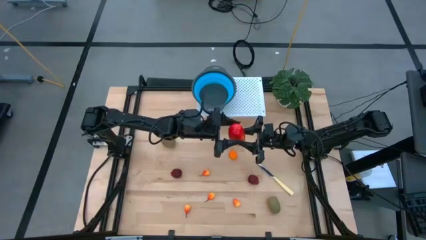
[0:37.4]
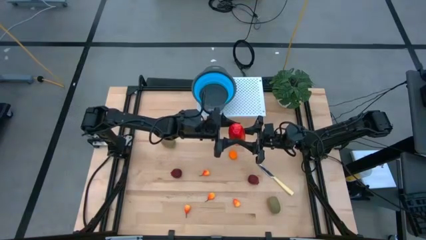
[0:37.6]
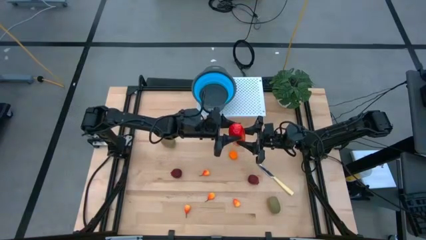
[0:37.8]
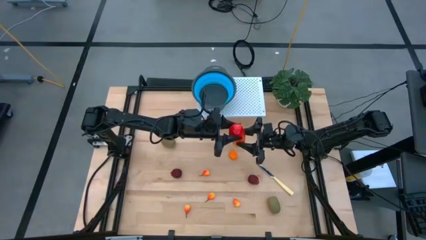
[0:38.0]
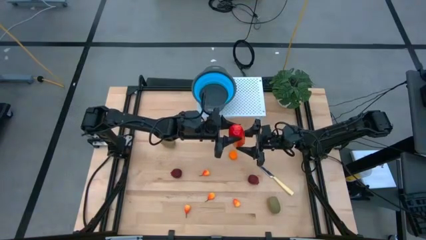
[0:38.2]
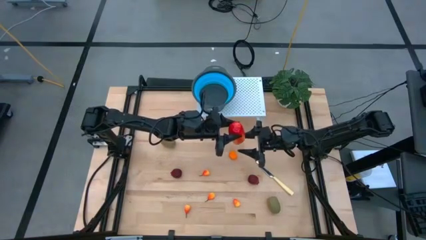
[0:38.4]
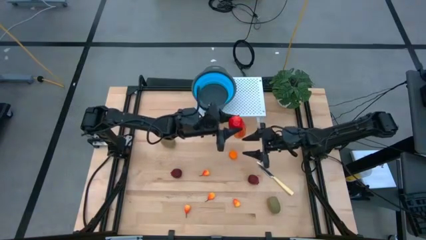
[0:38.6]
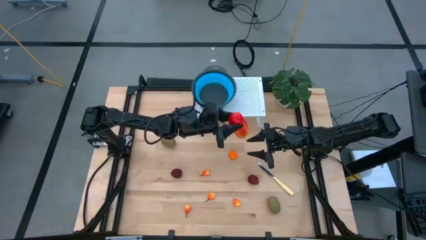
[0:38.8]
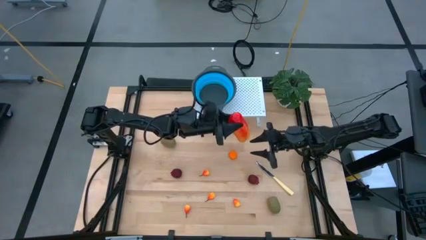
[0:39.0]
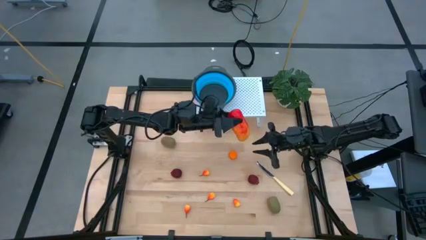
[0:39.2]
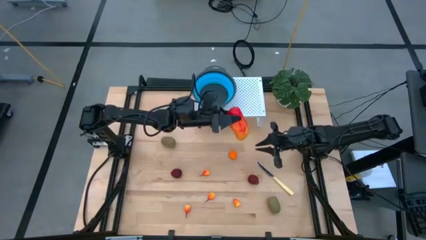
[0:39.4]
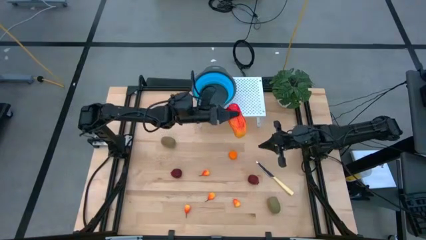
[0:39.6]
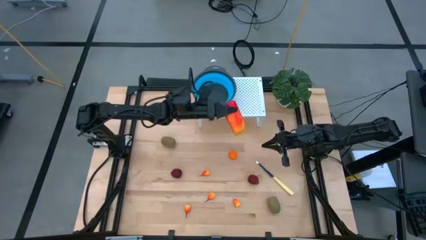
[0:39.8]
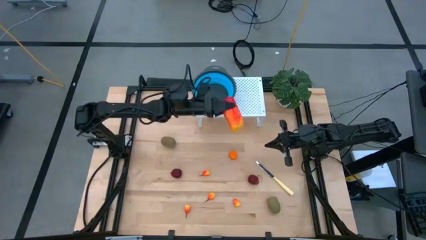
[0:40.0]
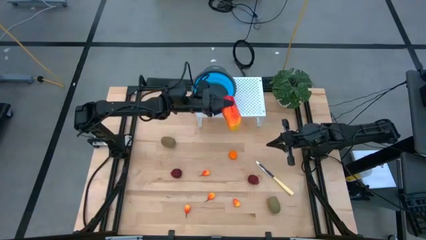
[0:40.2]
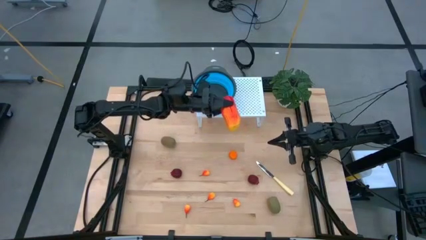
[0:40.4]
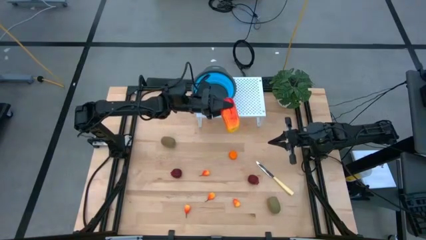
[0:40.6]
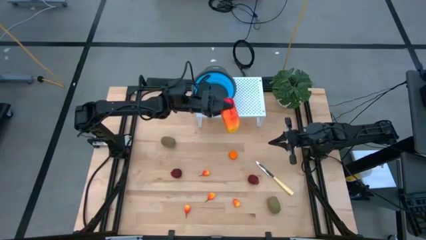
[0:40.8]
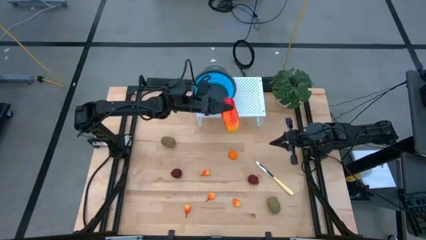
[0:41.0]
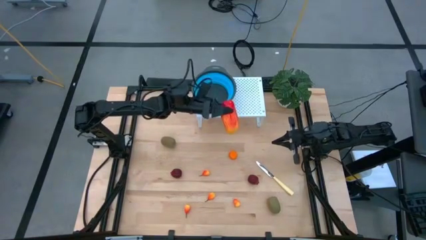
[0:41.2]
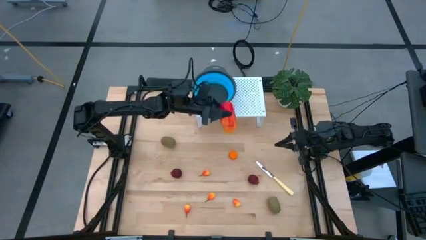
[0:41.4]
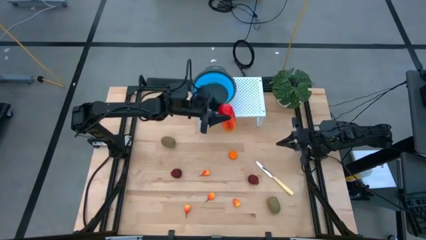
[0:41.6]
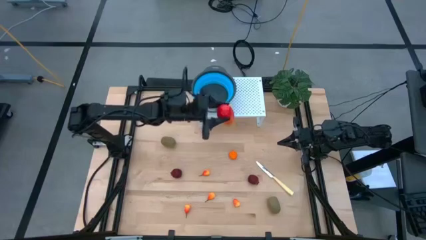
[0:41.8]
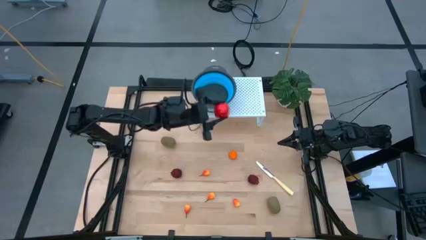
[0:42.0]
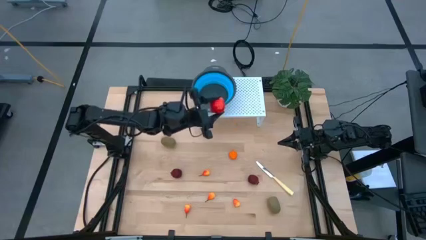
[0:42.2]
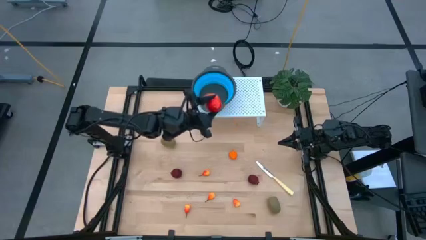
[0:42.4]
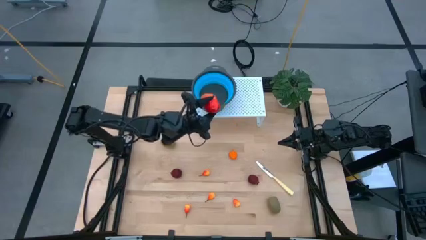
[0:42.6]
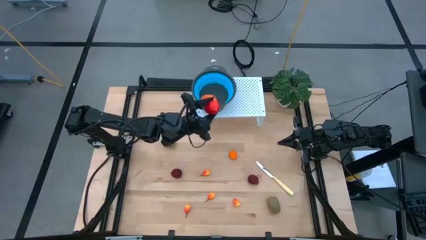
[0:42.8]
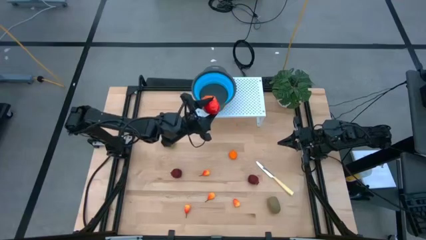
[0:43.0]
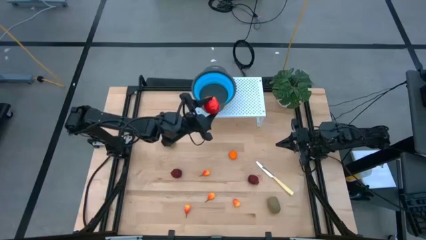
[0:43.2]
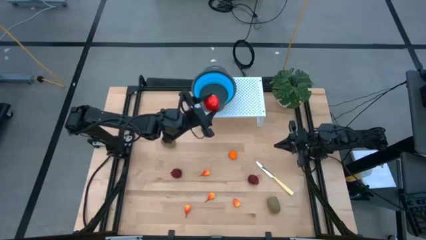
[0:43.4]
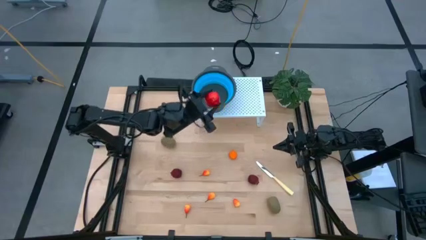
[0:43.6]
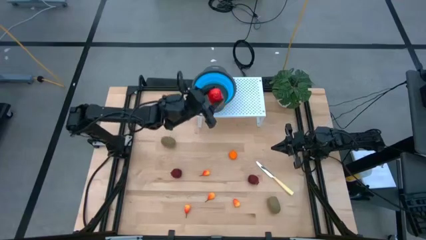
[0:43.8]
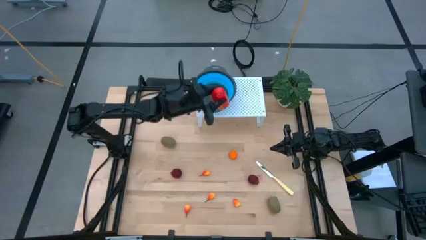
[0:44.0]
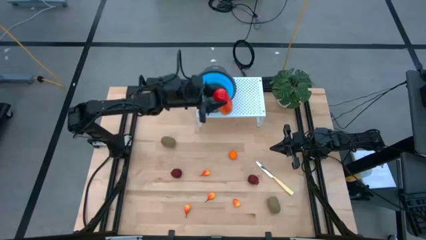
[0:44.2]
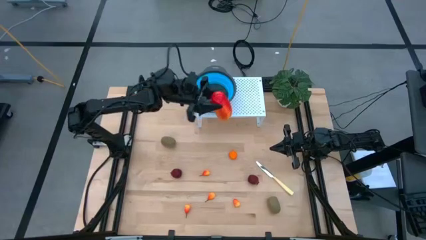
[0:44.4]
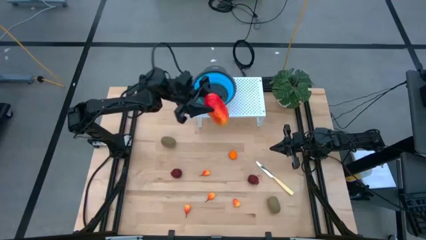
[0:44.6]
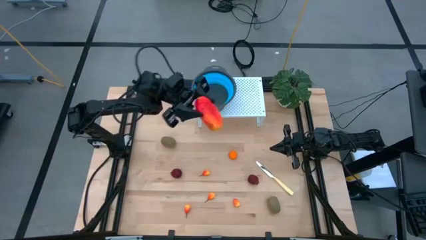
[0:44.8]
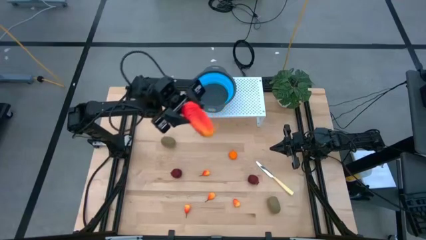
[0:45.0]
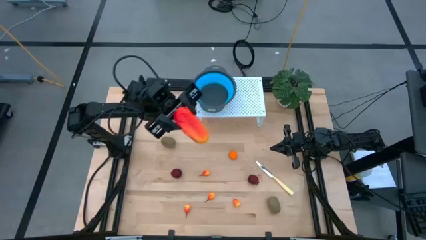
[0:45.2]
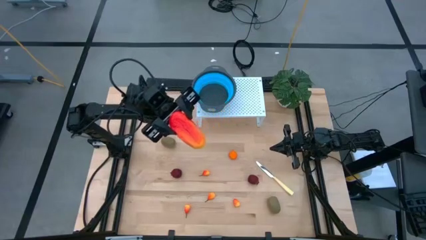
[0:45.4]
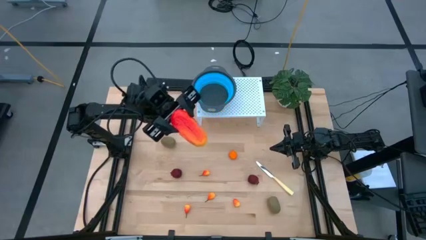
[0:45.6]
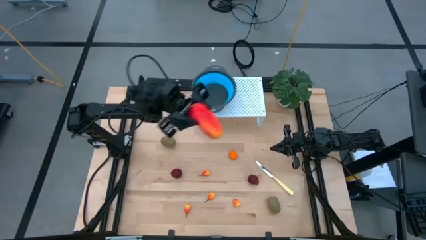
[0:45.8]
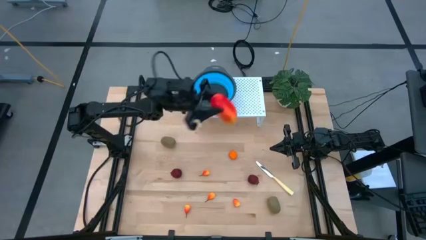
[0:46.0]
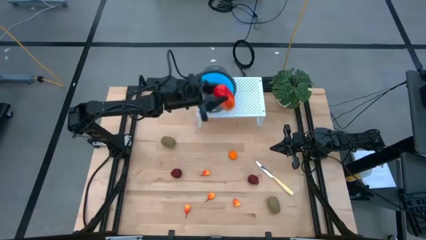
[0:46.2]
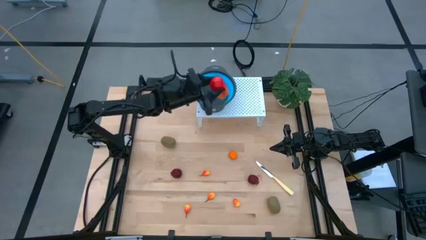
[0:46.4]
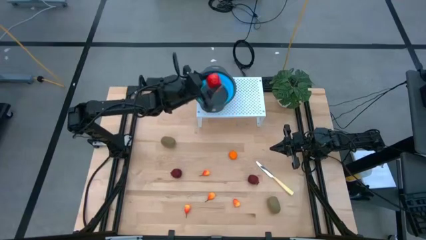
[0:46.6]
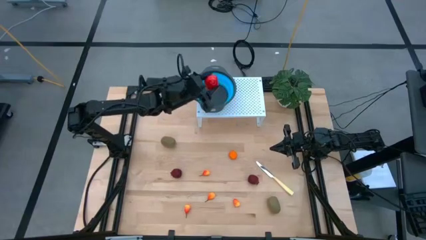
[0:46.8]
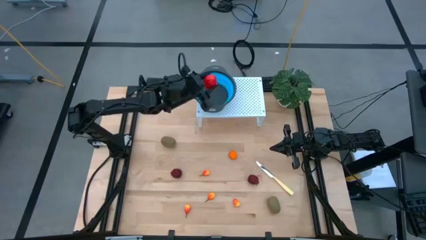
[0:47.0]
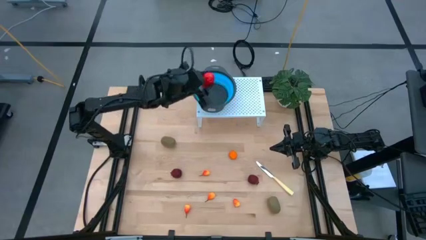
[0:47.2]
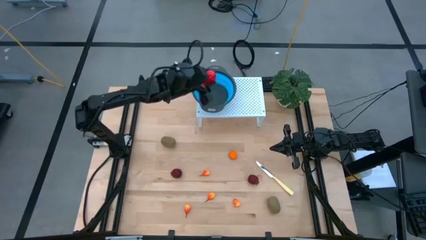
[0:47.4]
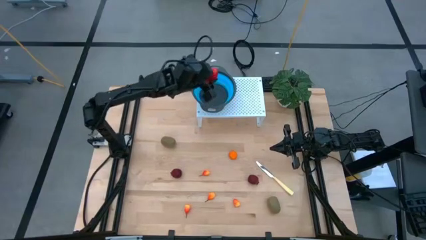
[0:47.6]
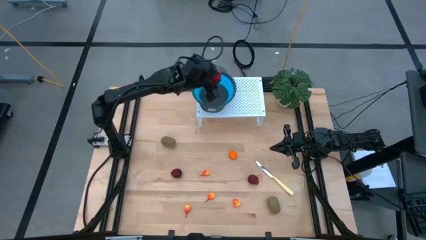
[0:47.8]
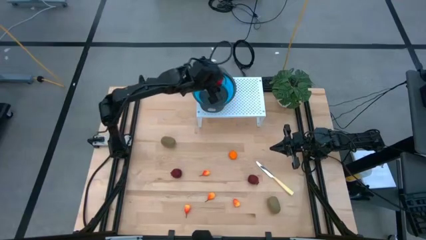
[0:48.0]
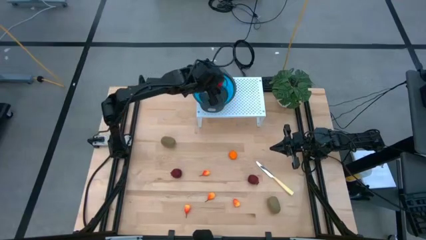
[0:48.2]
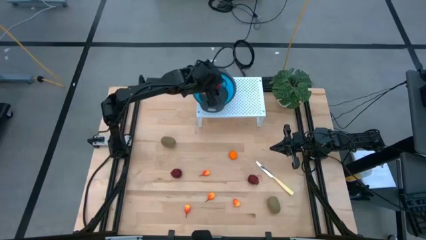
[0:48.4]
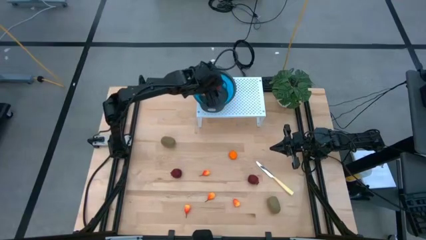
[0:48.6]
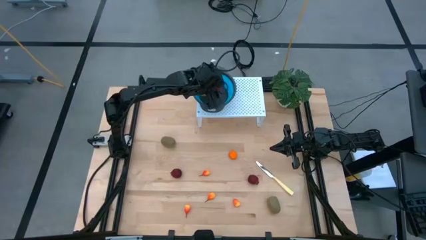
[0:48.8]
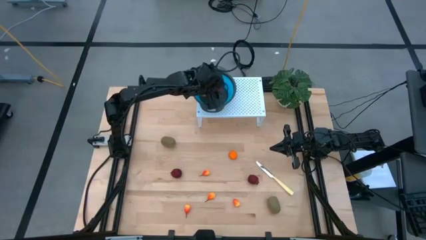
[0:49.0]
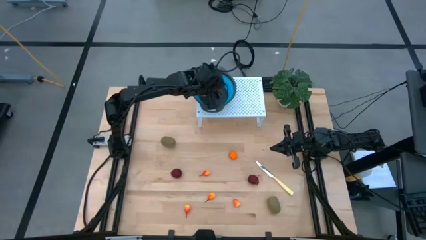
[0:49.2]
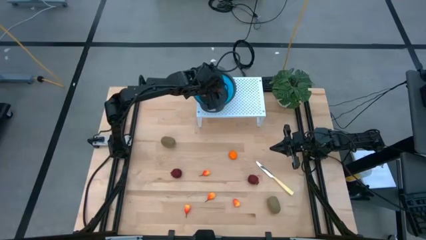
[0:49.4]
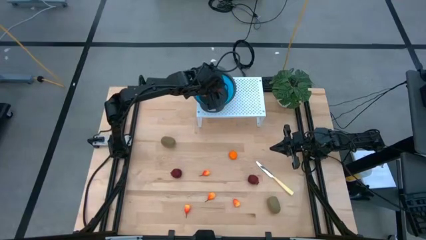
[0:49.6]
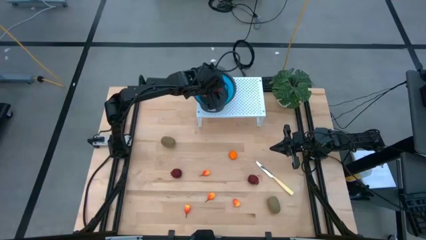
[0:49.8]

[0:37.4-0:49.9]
Task: Pick & Place Fruit
Put the mango into the blue strainer bowl on the shelf
